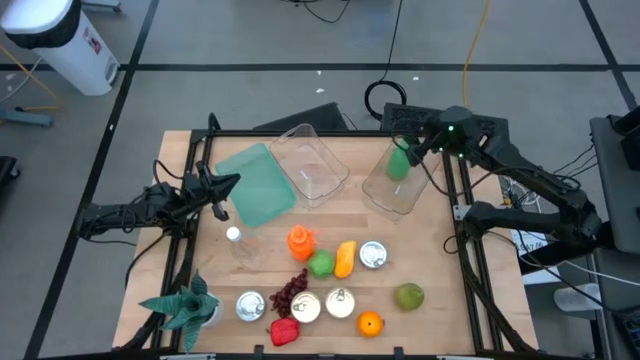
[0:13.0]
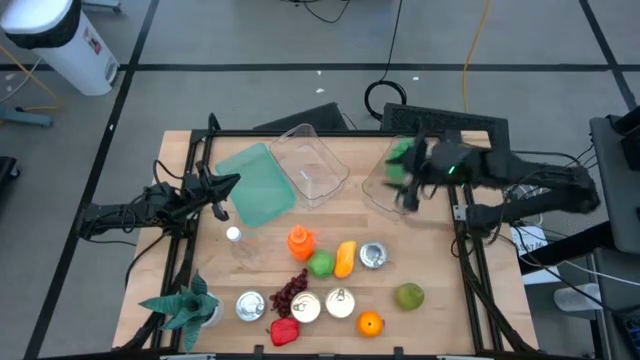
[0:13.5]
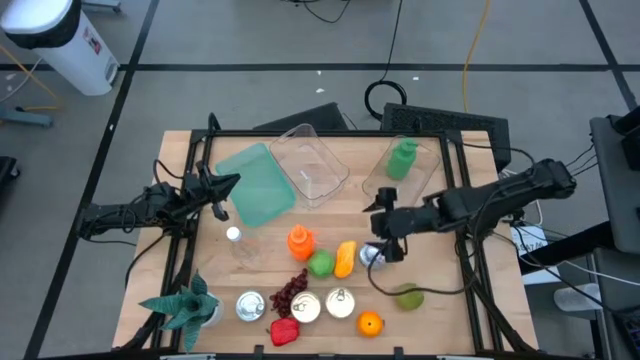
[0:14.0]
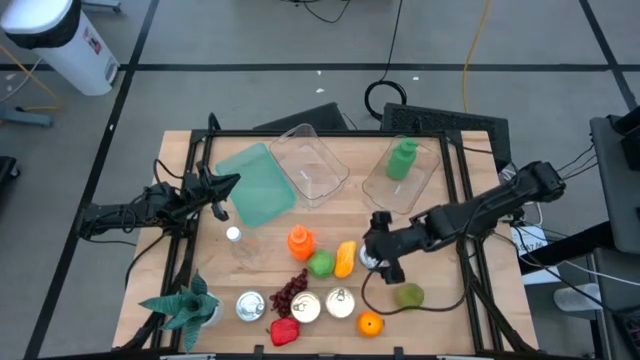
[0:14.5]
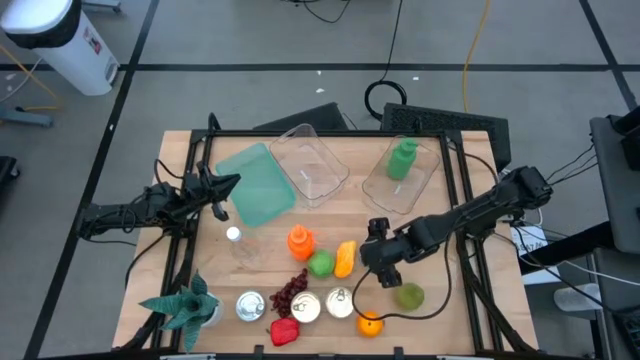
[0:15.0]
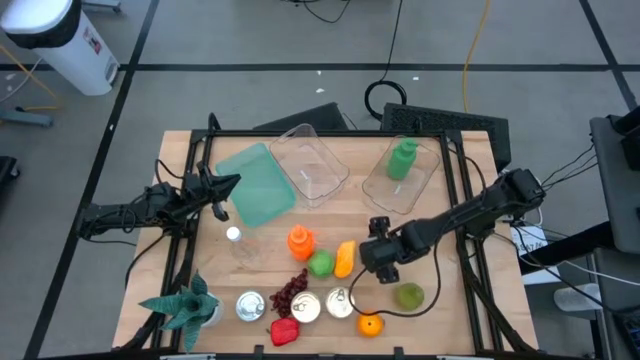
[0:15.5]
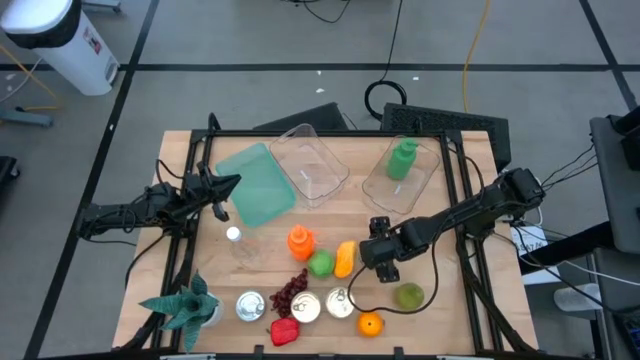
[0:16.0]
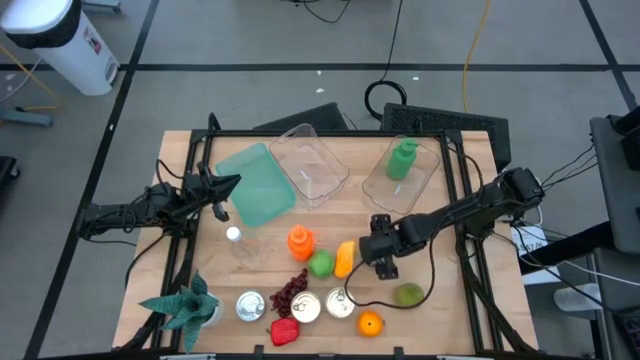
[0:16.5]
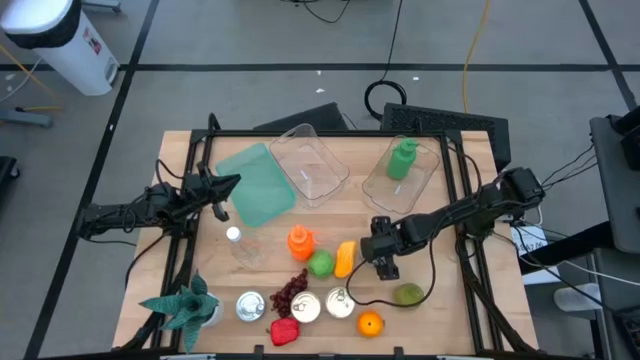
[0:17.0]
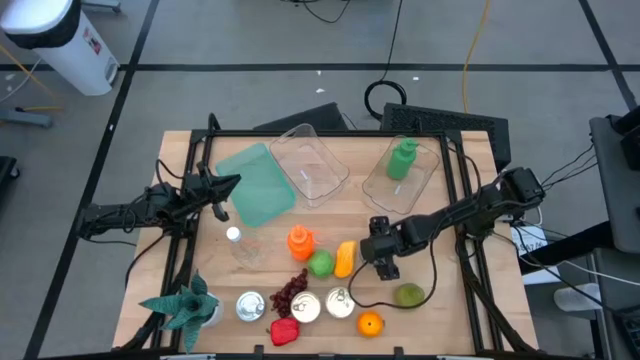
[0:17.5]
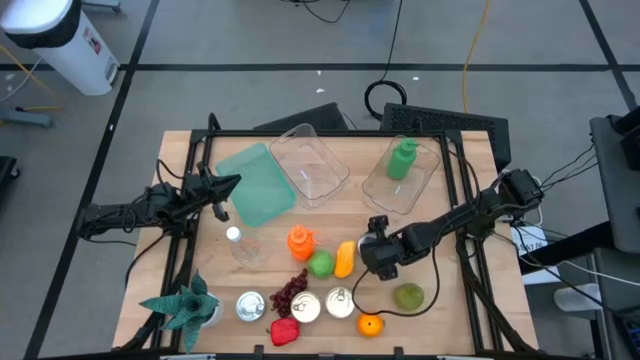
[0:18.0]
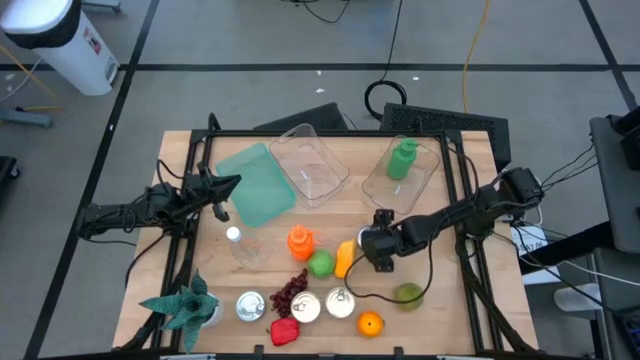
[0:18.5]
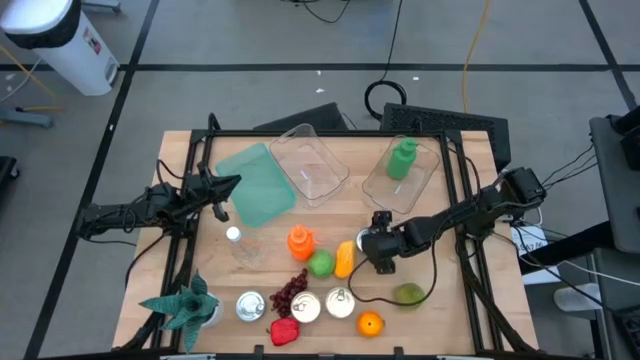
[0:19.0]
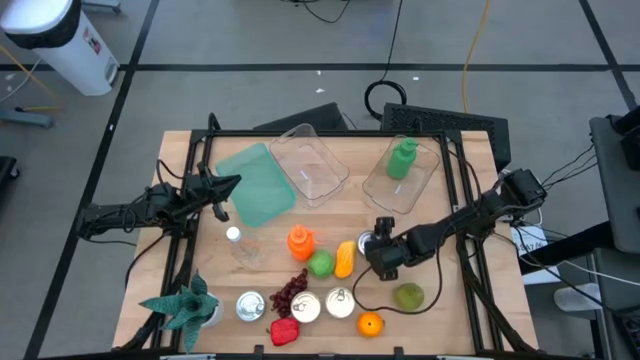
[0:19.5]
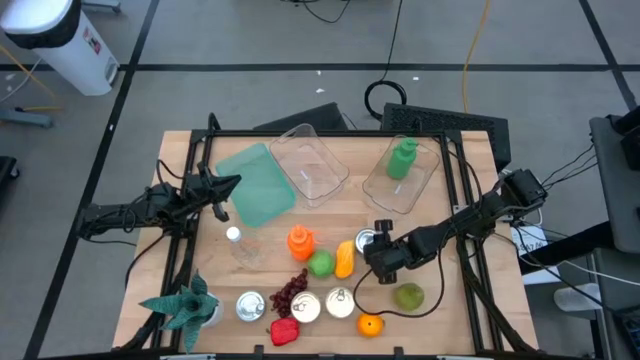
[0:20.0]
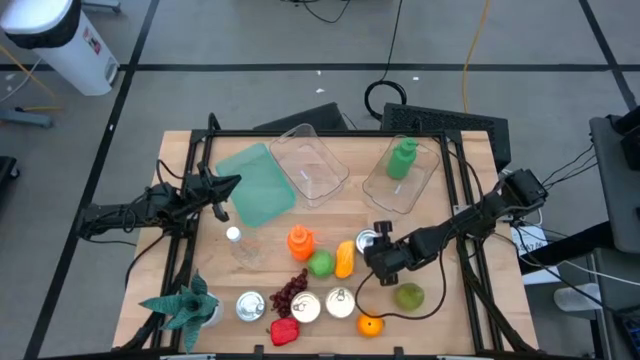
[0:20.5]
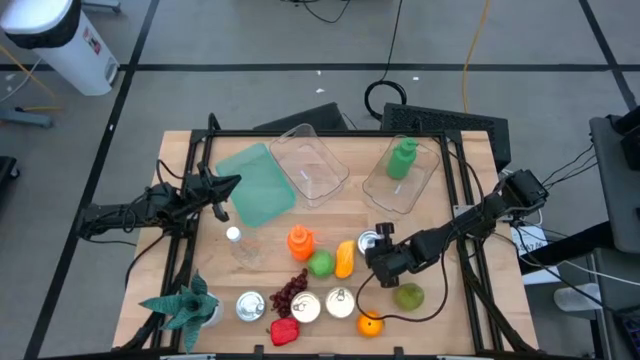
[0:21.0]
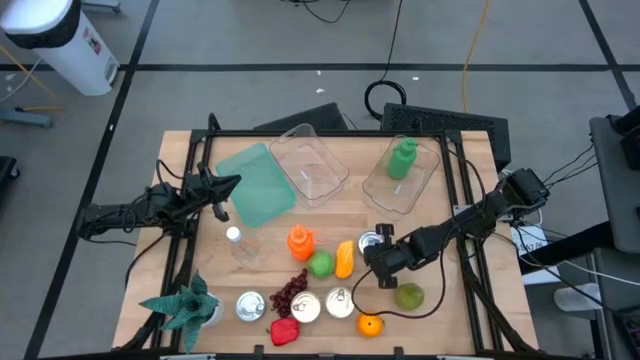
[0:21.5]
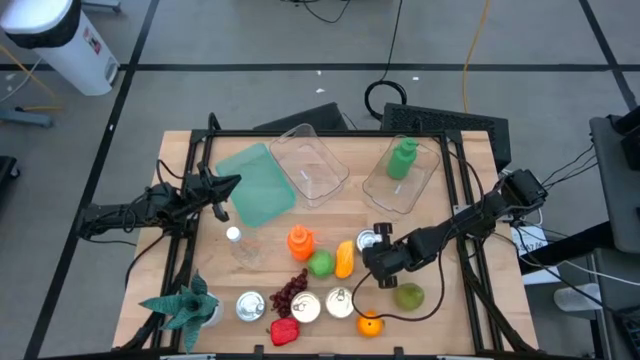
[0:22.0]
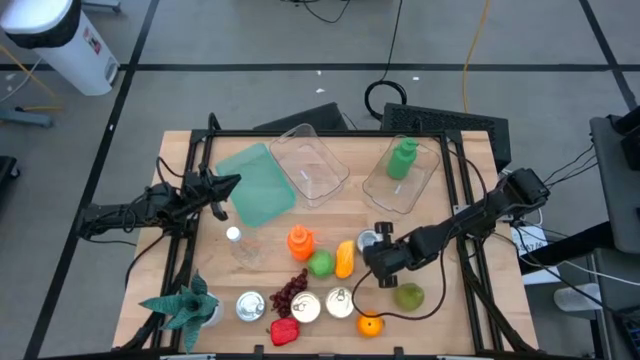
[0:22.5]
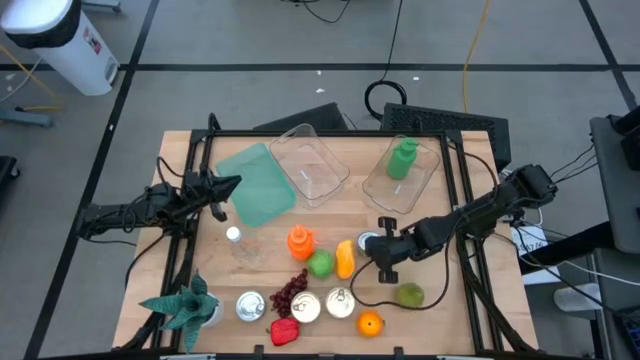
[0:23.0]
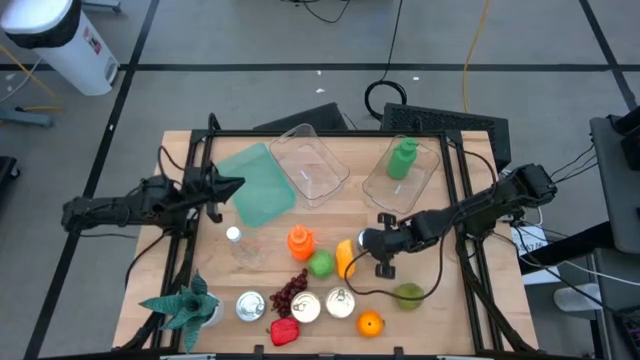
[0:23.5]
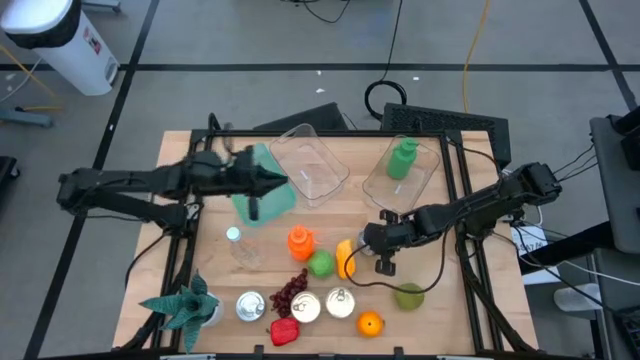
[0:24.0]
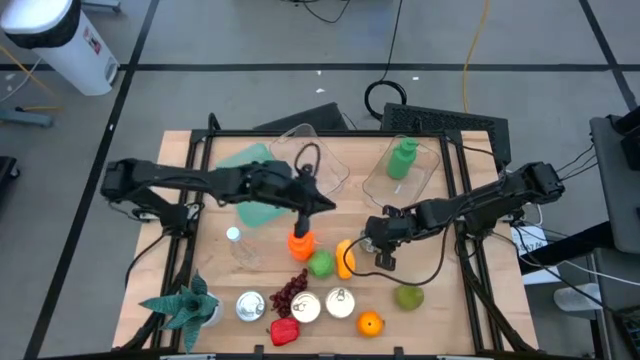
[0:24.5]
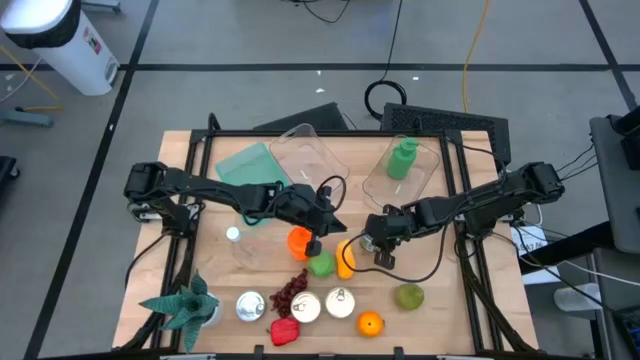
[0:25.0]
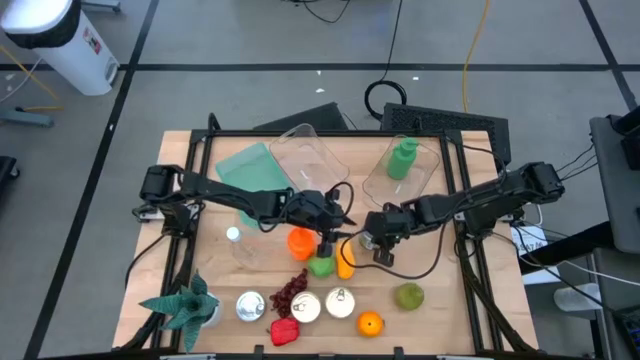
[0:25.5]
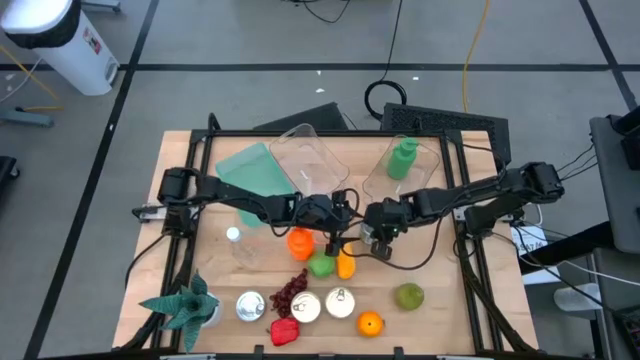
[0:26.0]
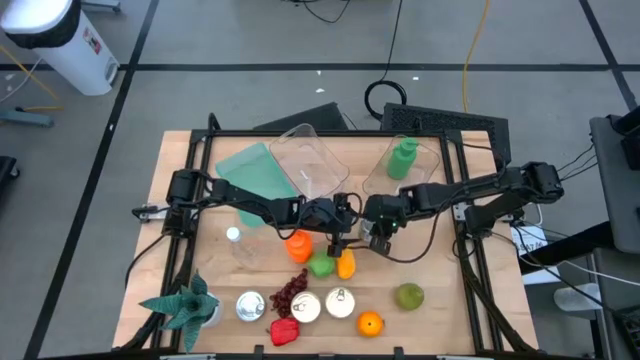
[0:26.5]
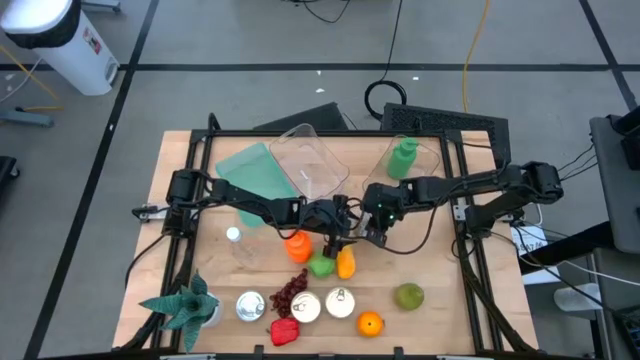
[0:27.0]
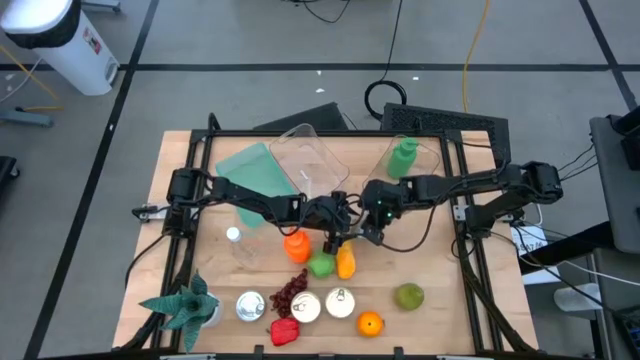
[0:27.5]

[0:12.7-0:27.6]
Task: Pick & Place Food Item
Put the green tuna can into the green bin

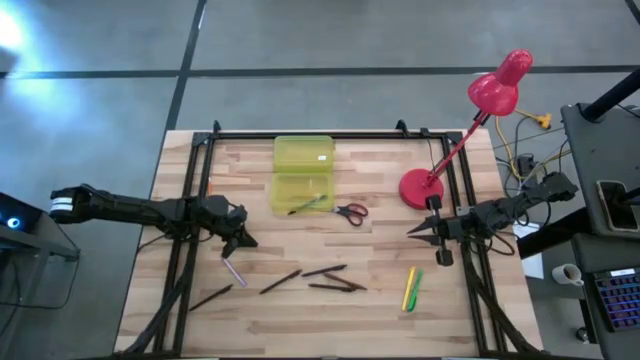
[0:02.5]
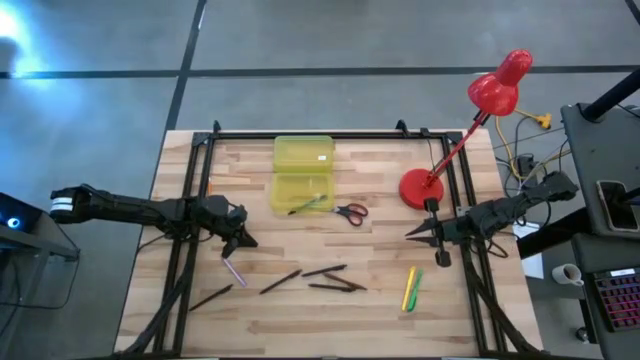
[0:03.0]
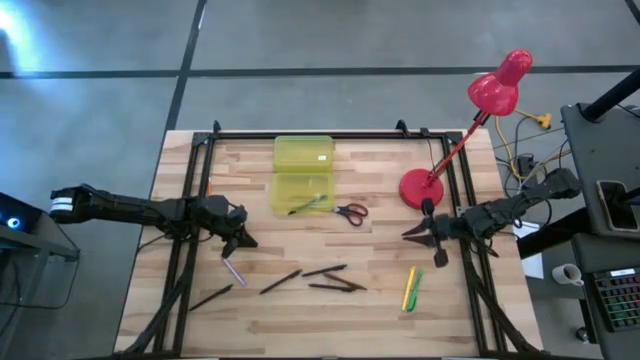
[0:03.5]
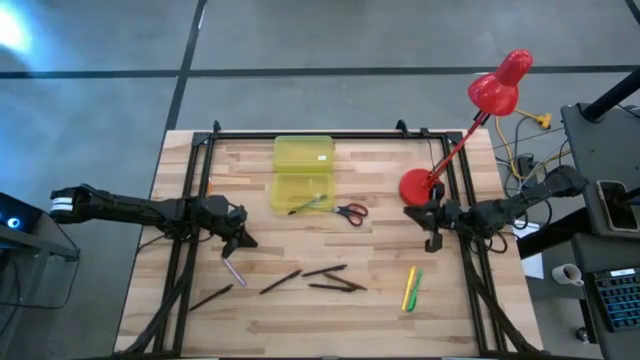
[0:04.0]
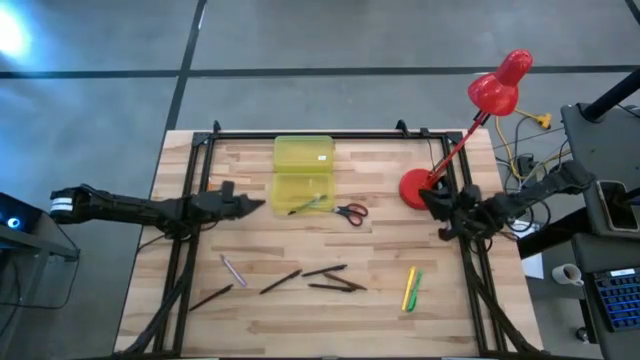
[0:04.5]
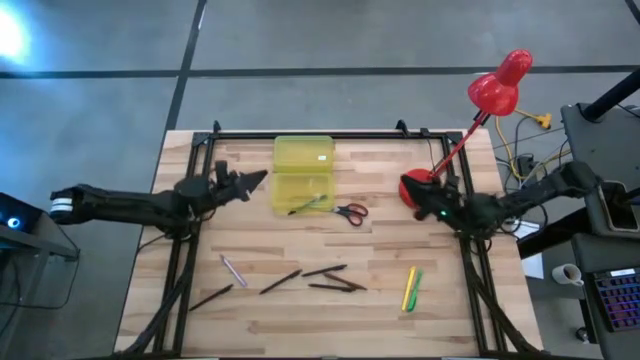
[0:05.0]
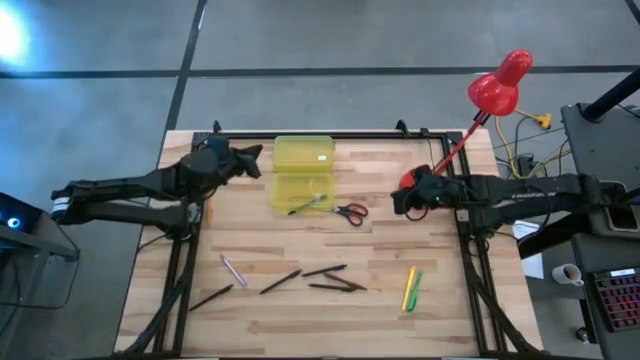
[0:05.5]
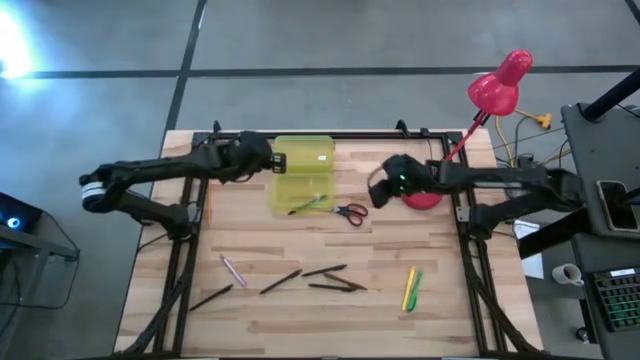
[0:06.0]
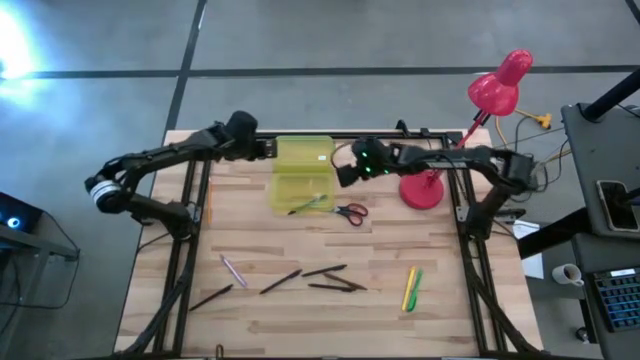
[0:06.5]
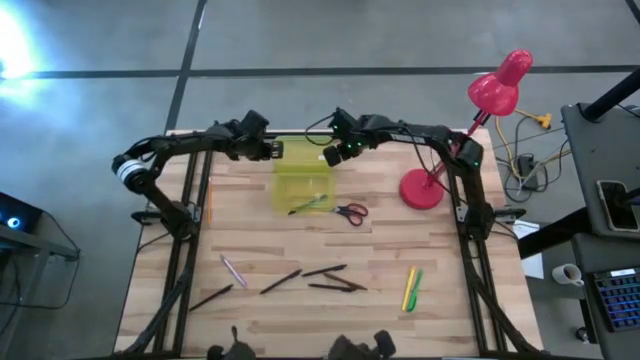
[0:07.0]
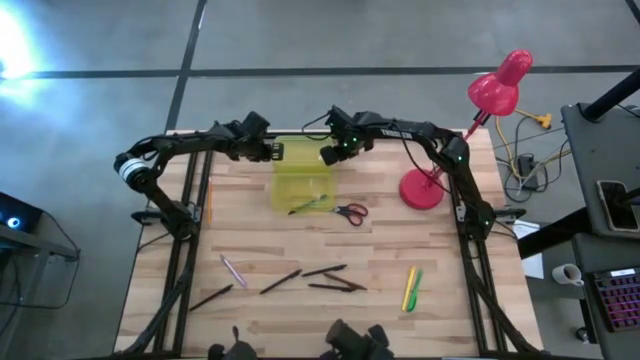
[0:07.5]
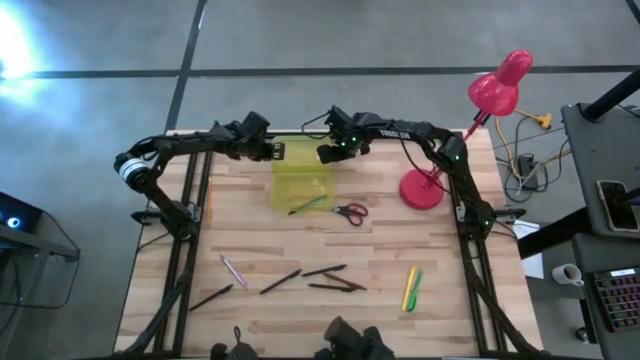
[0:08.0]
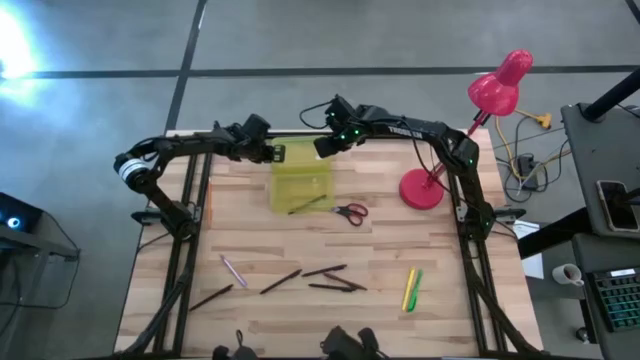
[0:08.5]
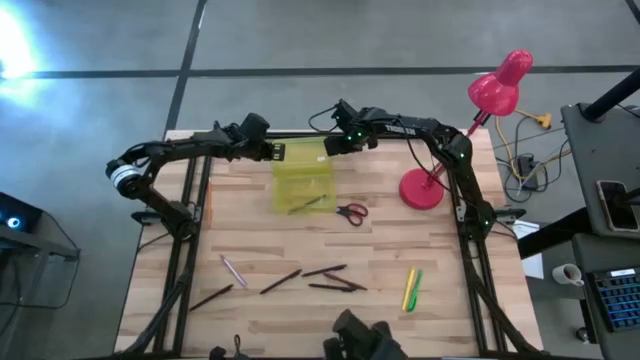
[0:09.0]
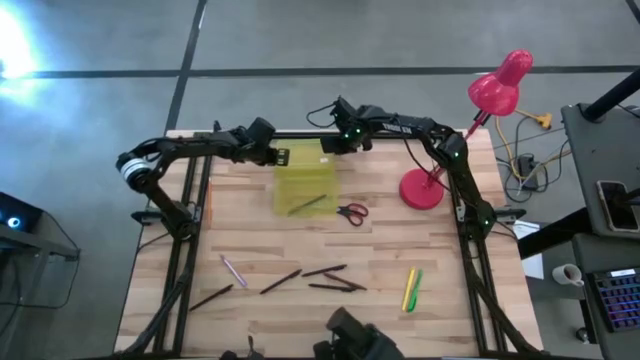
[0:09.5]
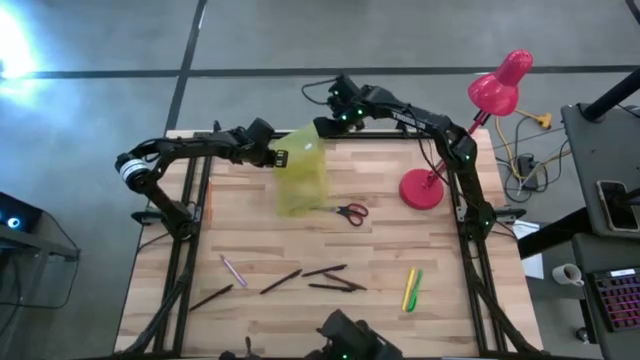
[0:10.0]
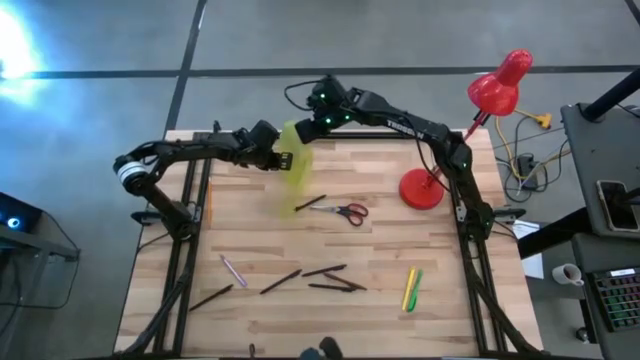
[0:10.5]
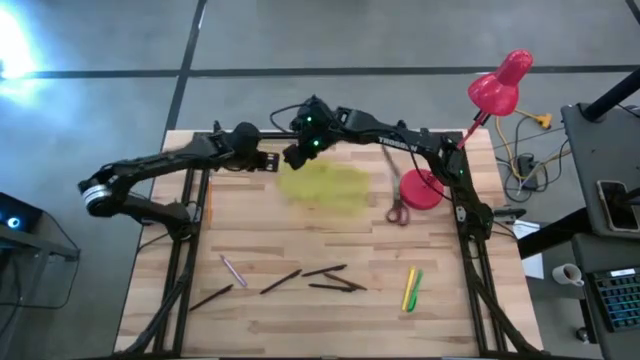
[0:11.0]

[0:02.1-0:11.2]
Task: Pick & place school supplies into a supply box
Prepare the supply box on the top middle
